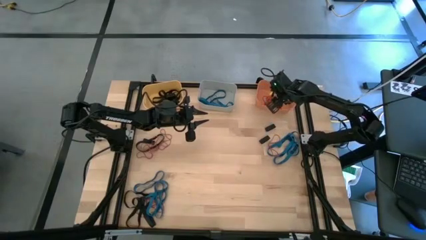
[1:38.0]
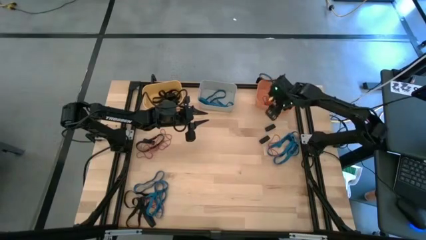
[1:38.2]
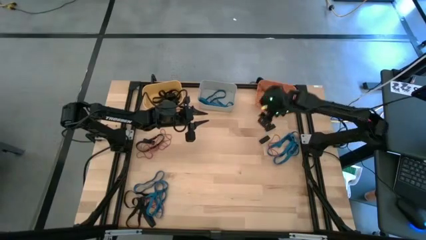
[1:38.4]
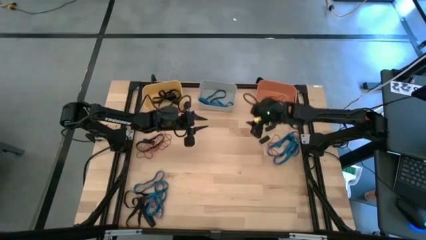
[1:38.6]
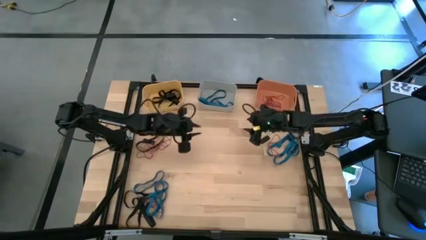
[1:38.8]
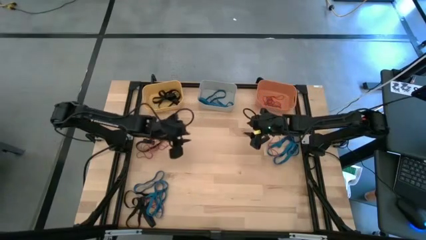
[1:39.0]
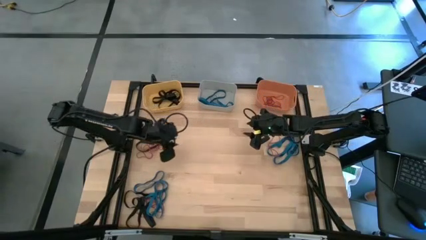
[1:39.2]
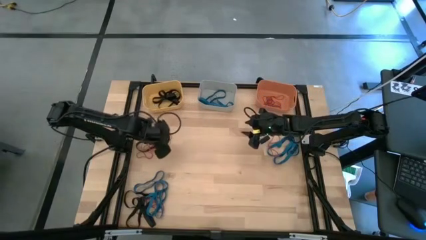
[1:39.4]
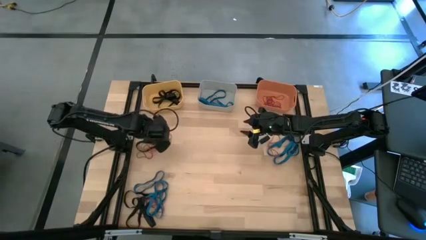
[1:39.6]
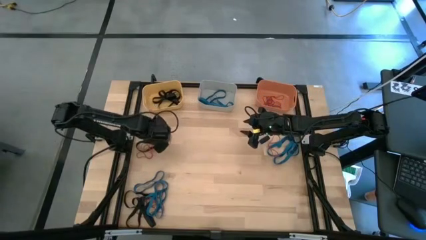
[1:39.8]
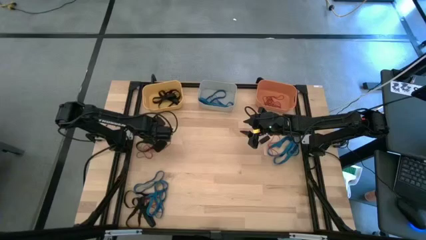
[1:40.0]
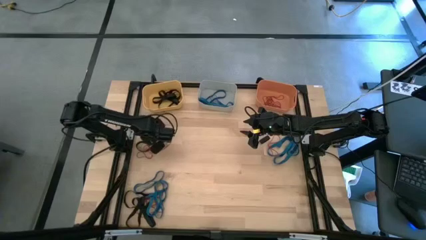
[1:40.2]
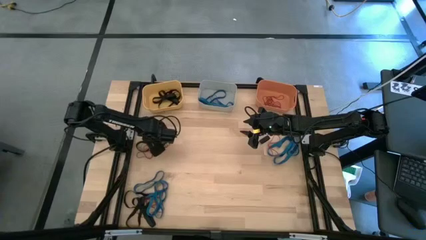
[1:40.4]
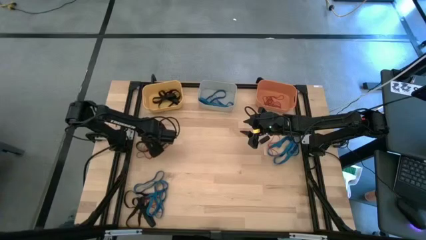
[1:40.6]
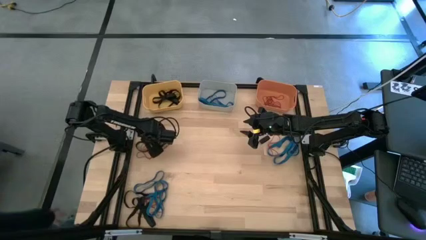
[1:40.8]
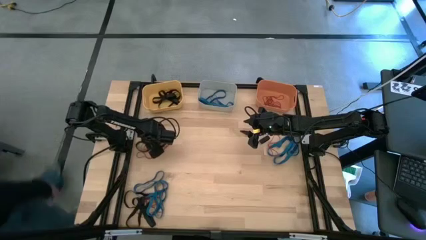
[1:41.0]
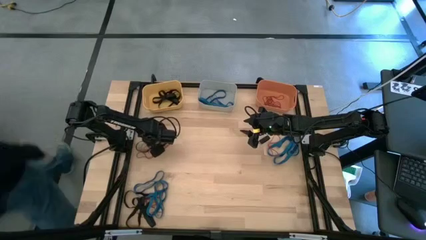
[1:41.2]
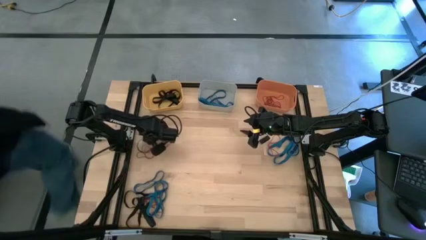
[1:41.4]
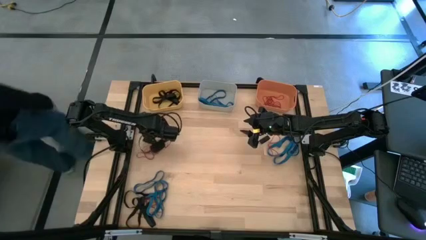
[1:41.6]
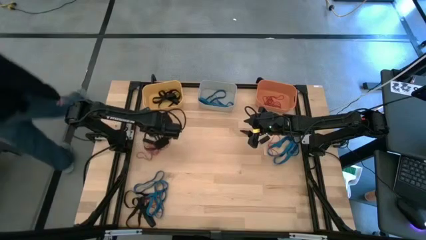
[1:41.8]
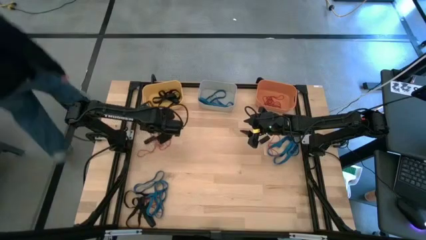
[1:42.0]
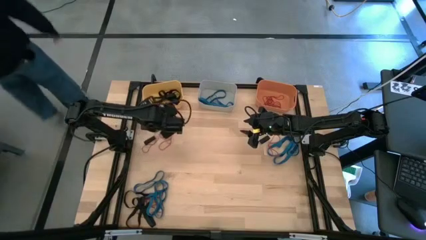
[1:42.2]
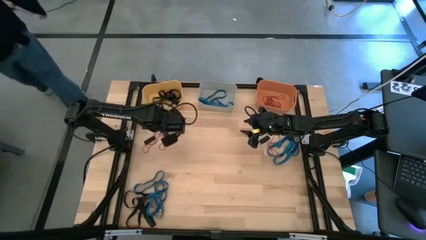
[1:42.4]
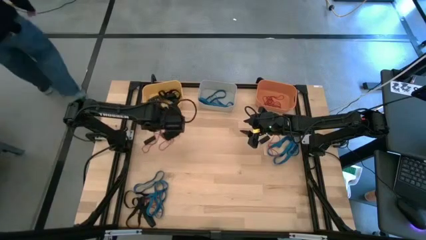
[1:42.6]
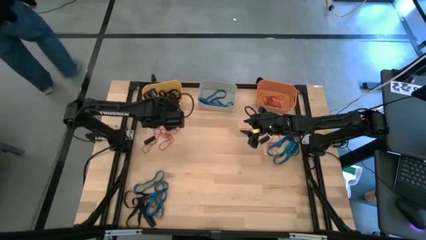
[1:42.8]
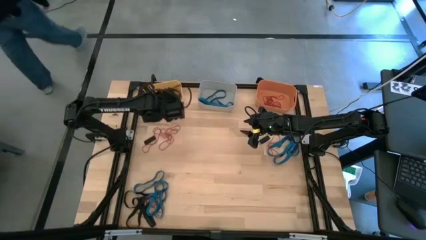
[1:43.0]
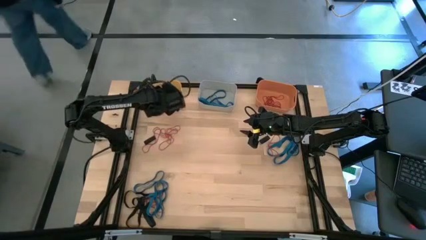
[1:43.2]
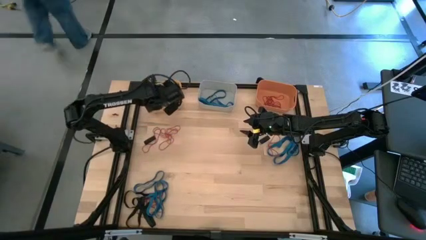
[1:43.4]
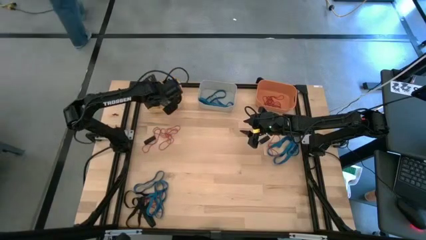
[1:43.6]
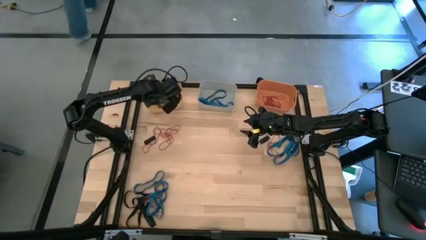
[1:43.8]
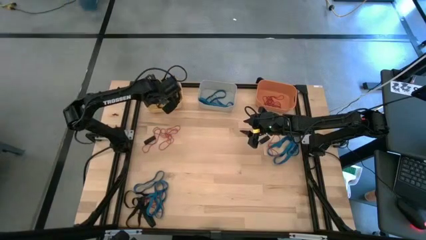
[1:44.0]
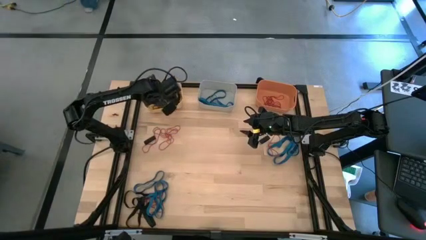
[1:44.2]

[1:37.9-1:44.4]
Task: Sort rubber bands into baskets
Put the black rubber band into the yellow bin

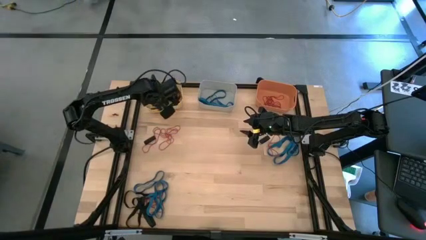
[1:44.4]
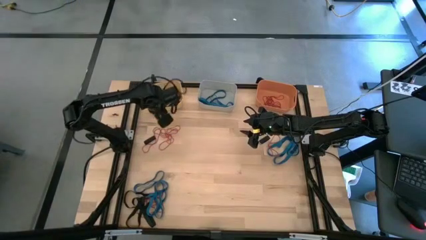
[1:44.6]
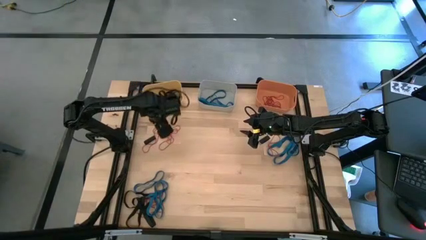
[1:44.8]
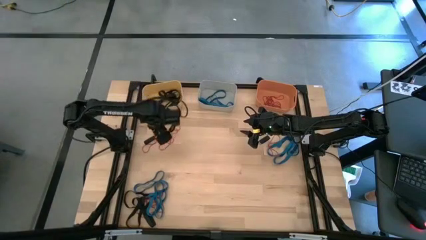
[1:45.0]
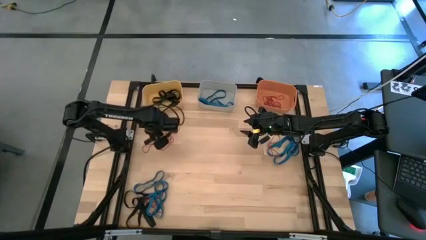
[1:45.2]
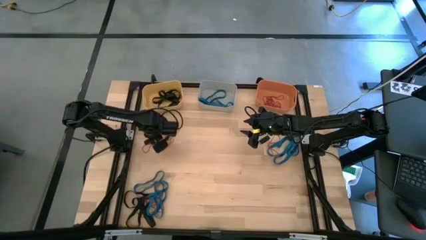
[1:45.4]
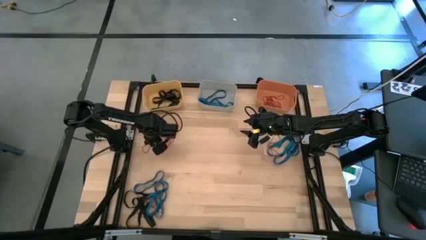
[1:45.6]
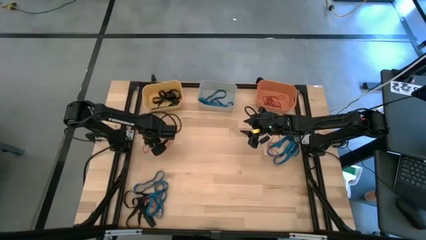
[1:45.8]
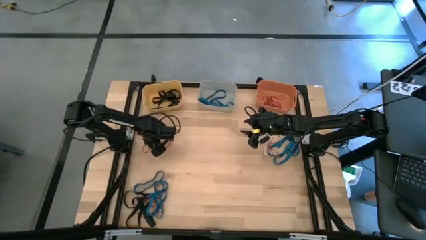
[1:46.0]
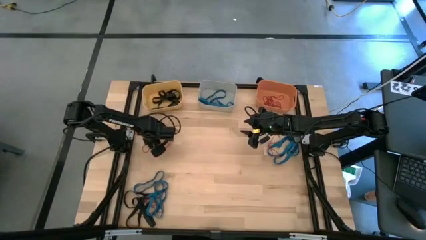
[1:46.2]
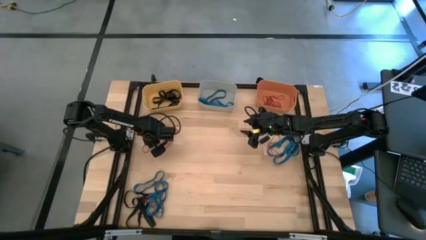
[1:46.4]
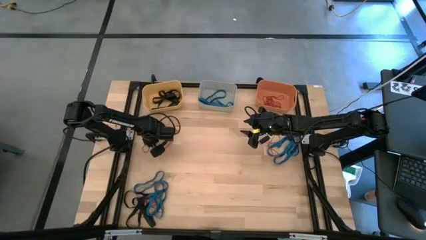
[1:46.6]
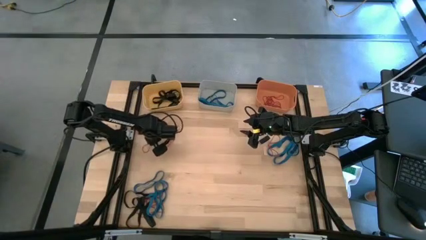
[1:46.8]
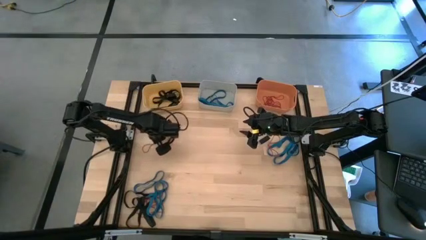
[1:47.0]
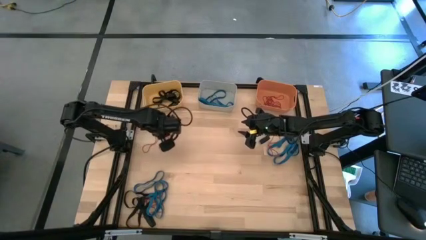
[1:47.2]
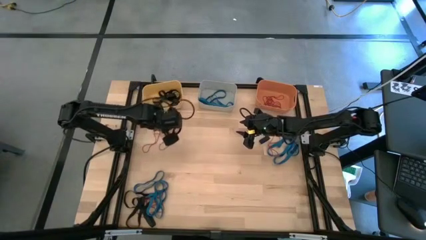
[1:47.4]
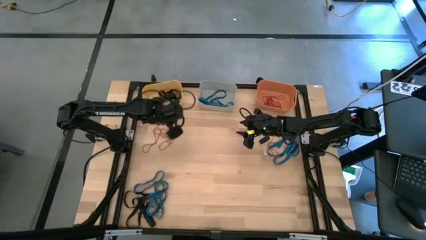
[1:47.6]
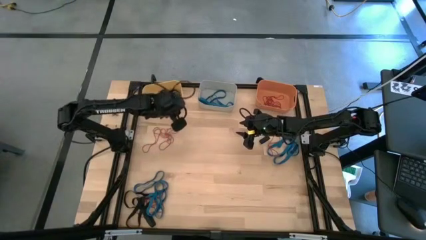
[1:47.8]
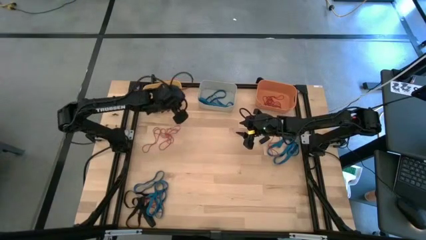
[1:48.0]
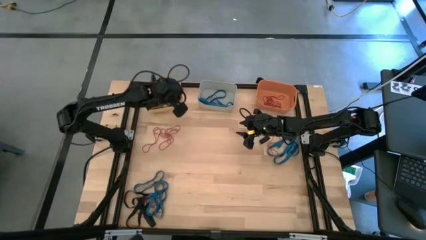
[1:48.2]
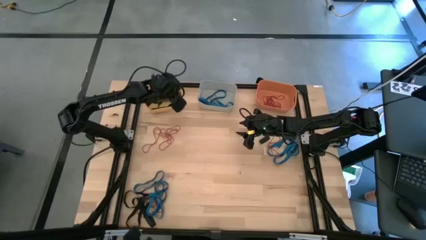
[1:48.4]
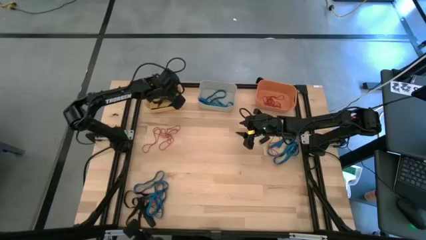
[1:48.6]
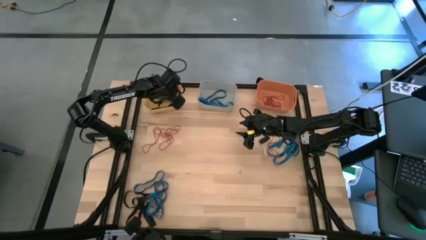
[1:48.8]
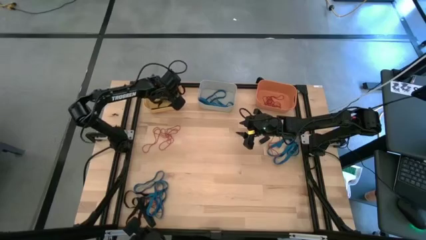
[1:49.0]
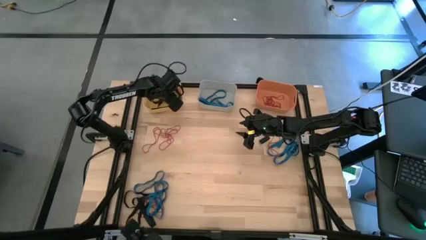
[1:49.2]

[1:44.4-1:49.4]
Put the black rubber band into the yellow bin

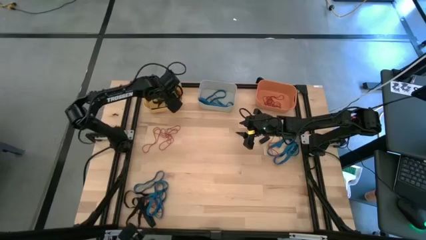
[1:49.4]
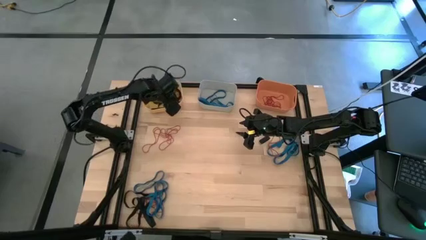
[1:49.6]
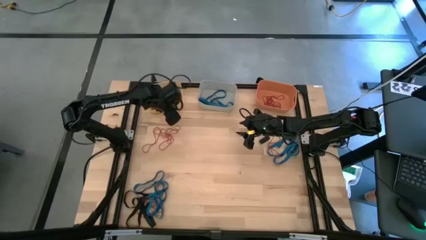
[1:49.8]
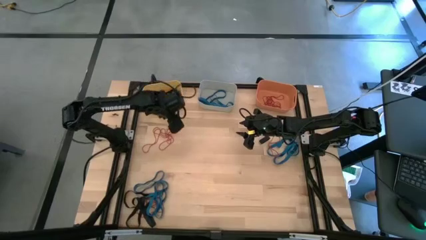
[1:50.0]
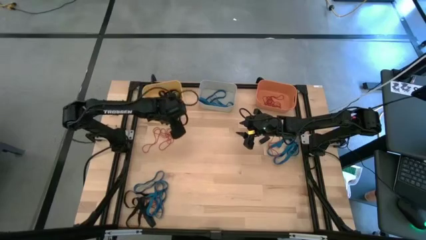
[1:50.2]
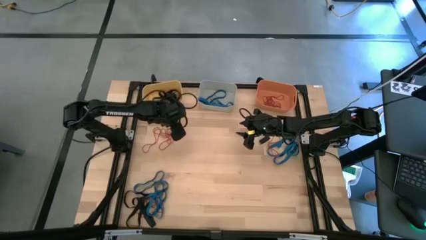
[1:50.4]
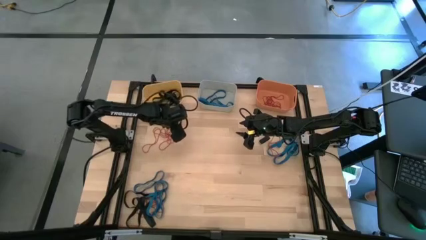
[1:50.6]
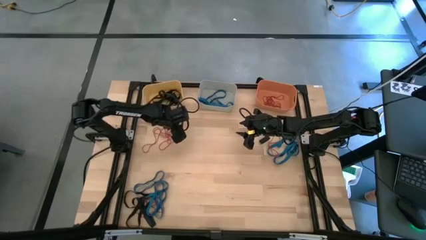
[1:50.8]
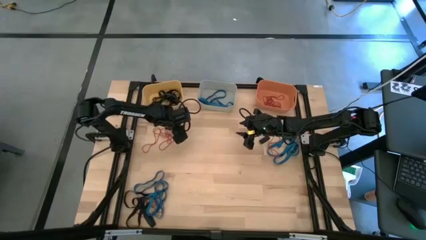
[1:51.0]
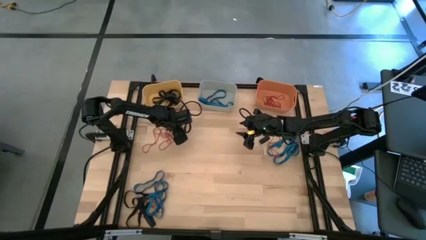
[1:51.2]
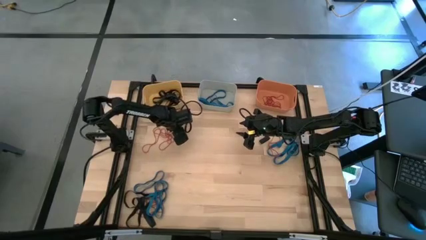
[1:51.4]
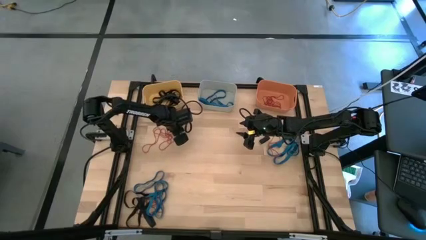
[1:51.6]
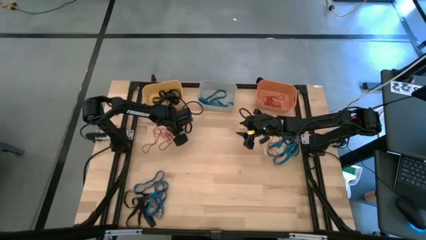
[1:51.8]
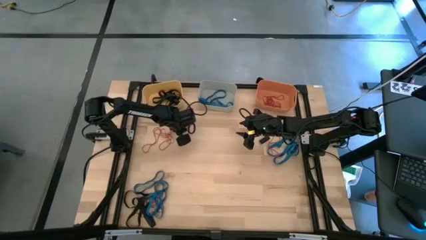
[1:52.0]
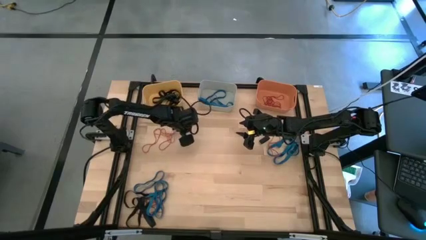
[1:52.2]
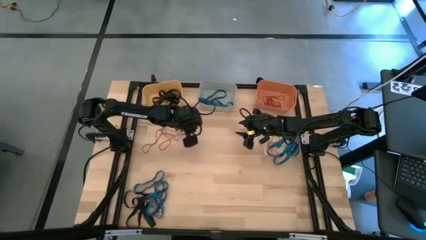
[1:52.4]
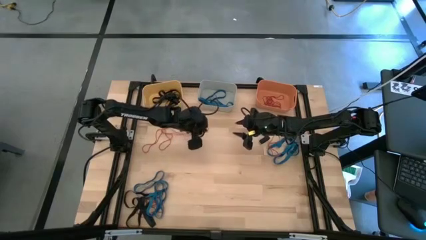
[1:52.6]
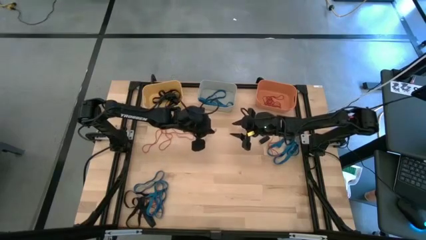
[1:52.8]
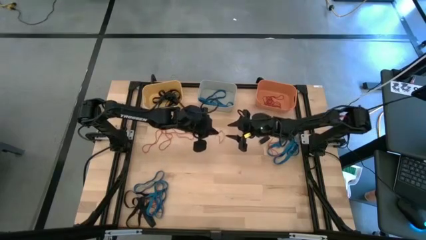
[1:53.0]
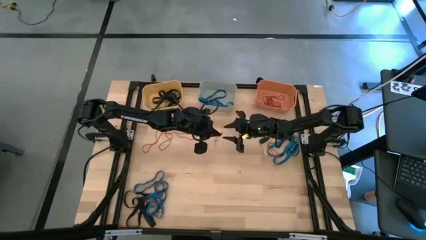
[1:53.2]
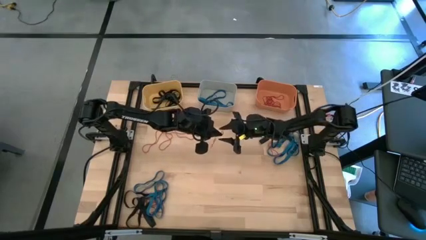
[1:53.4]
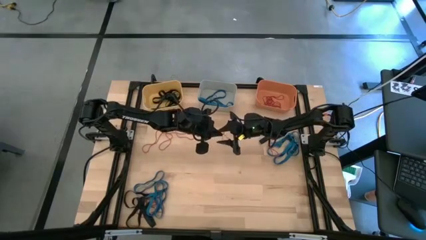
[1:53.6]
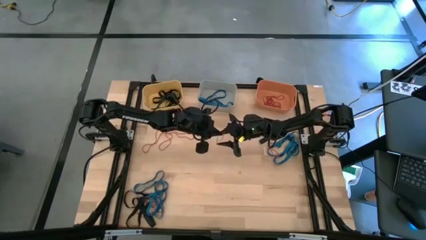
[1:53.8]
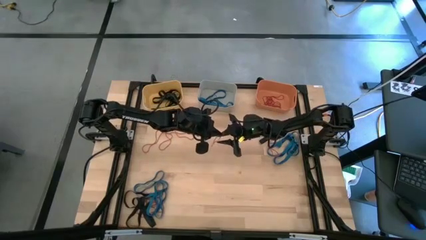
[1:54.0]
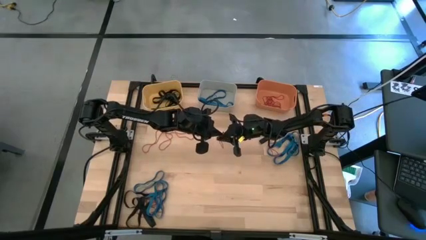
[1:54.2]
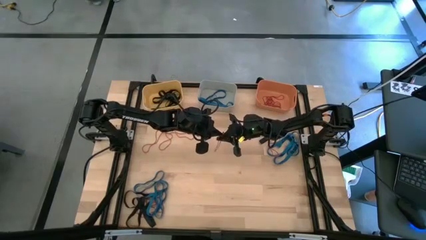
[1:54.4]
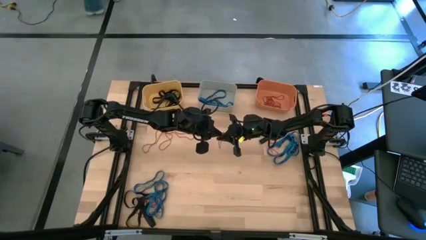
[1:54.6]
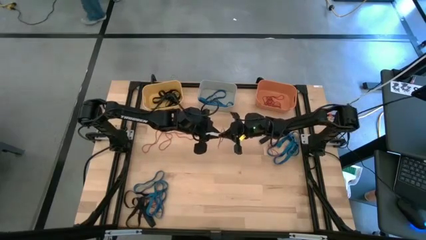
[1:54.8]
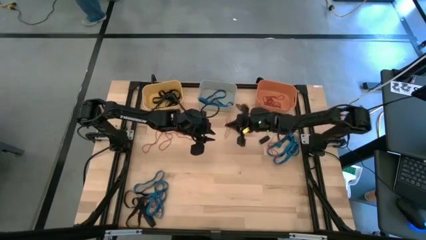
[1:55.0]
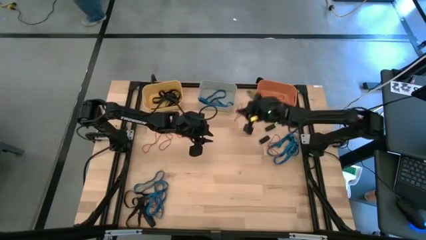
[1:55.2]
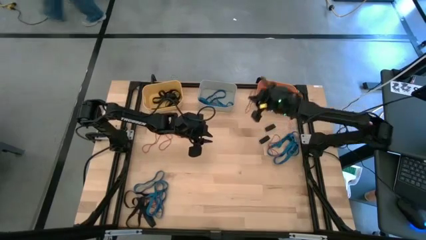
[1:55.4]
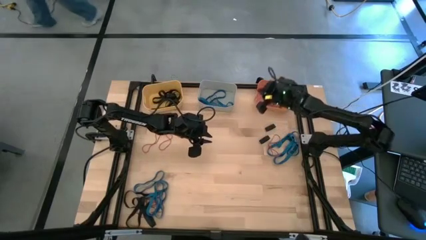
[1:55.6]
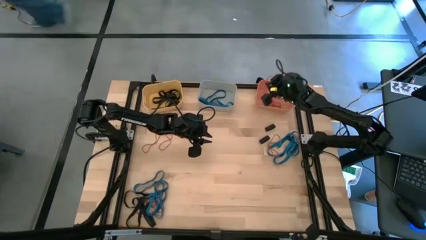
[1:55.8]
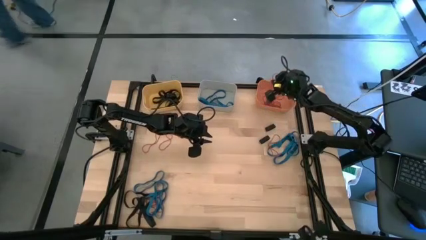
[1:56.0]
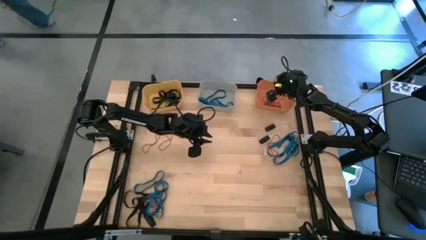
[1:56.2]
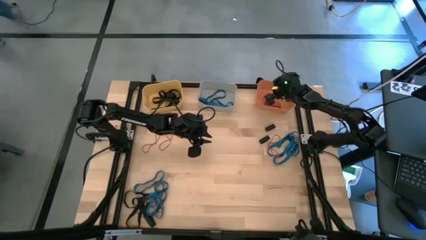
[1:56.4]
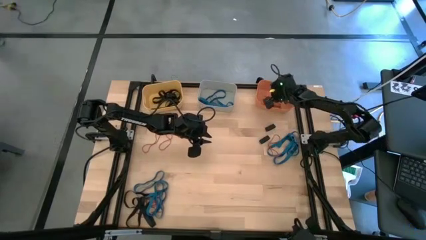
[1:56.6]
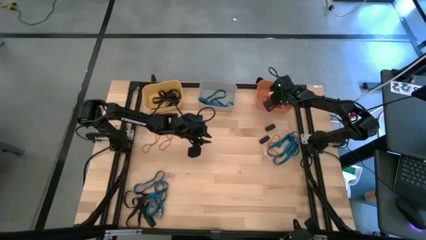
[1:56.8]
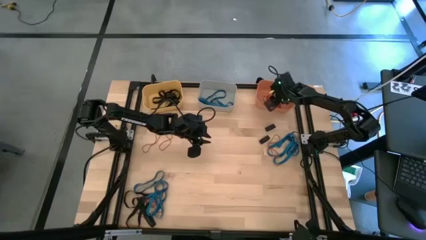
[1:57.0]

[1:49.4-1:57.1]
Put the red rubber band into the orange bin
